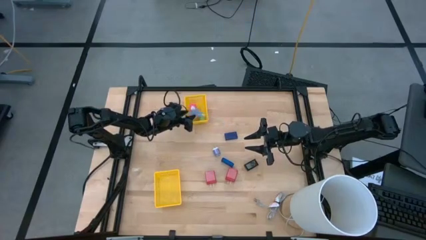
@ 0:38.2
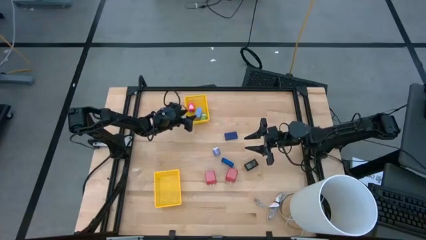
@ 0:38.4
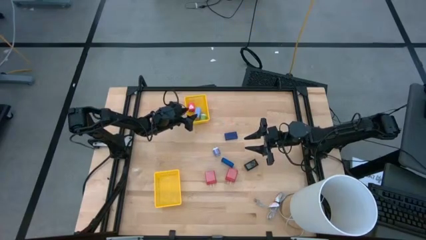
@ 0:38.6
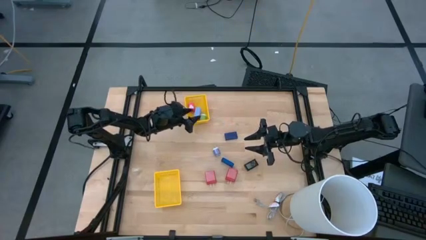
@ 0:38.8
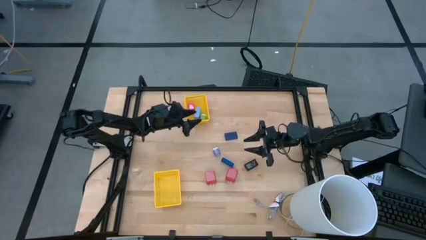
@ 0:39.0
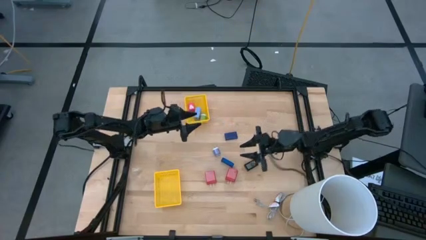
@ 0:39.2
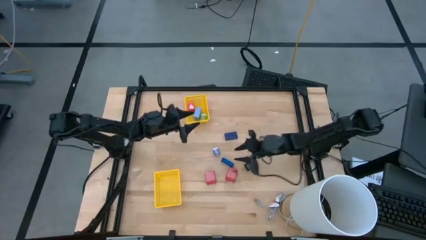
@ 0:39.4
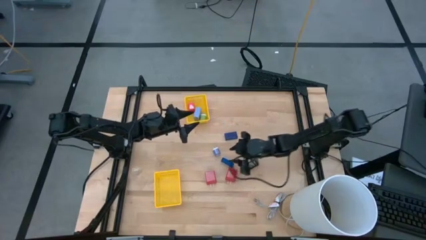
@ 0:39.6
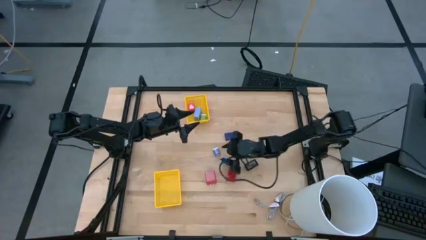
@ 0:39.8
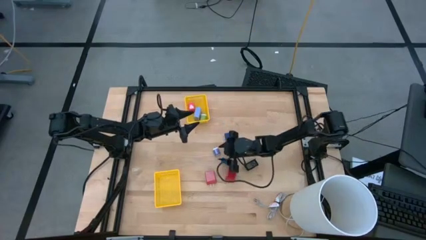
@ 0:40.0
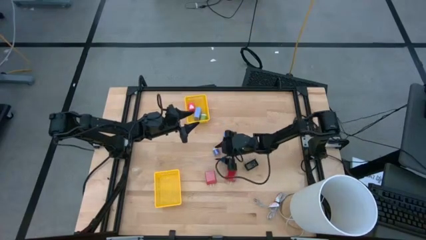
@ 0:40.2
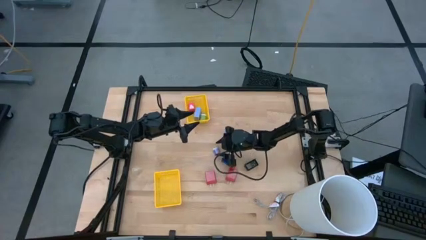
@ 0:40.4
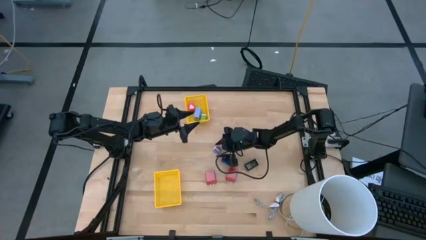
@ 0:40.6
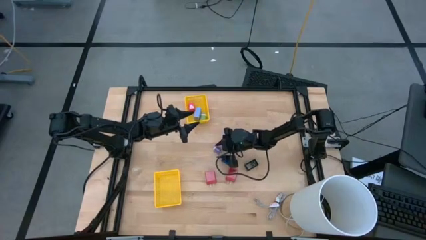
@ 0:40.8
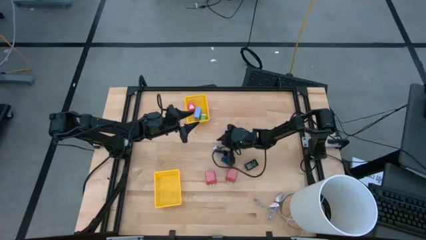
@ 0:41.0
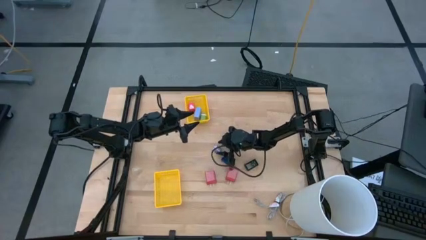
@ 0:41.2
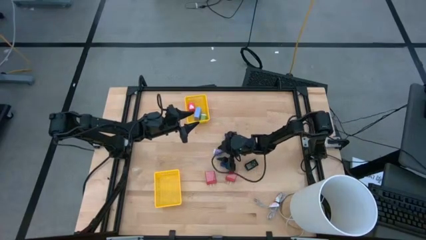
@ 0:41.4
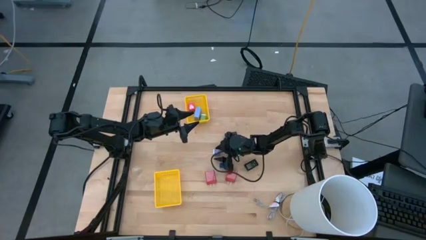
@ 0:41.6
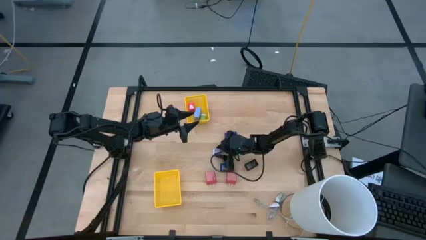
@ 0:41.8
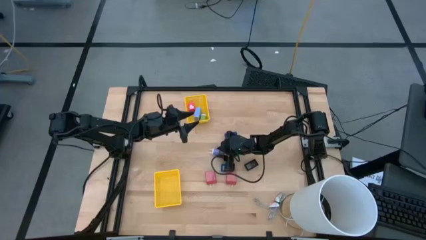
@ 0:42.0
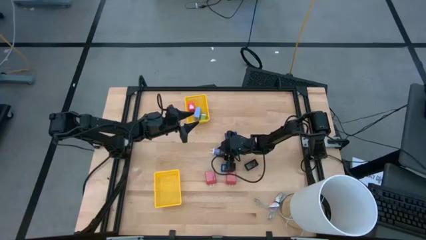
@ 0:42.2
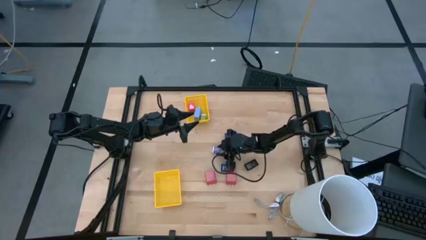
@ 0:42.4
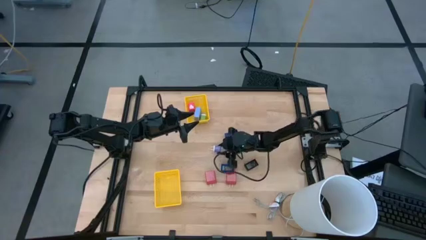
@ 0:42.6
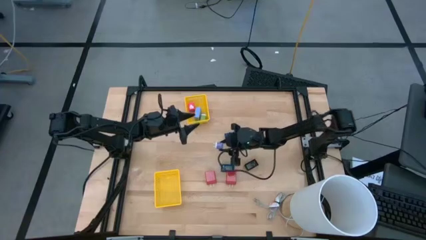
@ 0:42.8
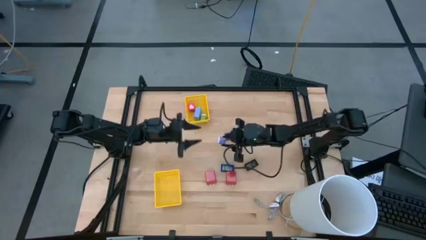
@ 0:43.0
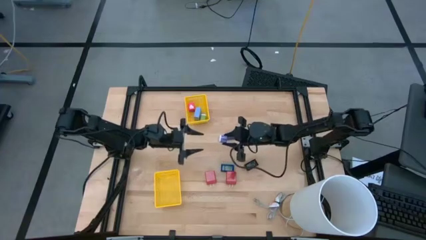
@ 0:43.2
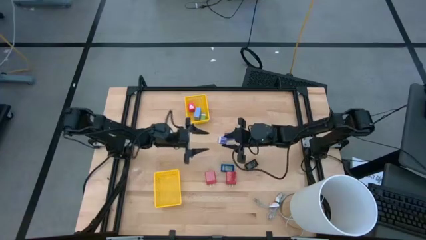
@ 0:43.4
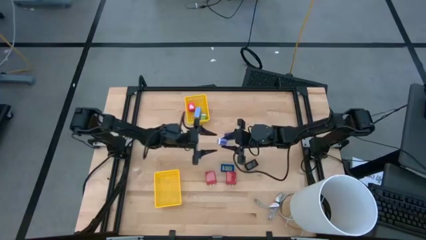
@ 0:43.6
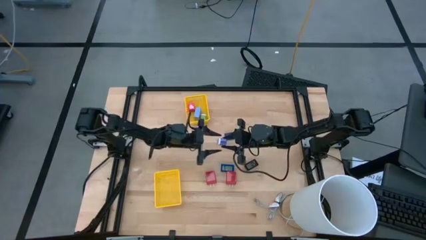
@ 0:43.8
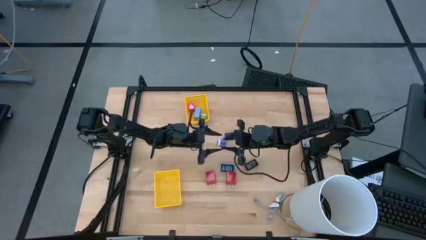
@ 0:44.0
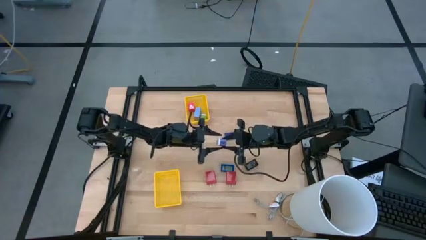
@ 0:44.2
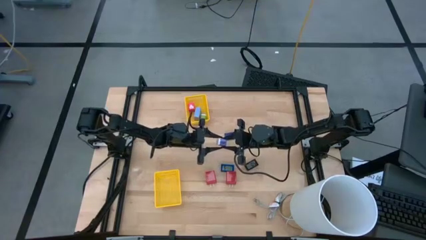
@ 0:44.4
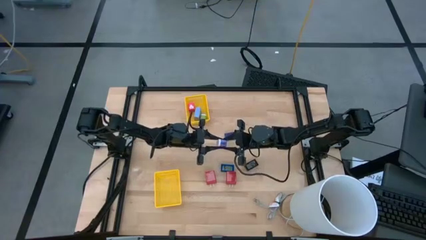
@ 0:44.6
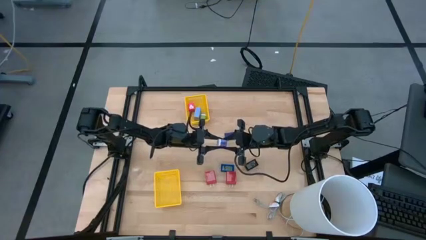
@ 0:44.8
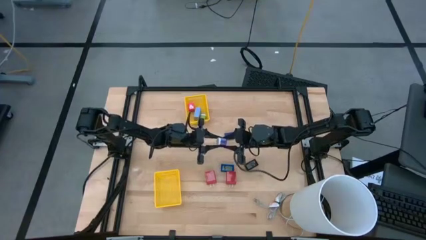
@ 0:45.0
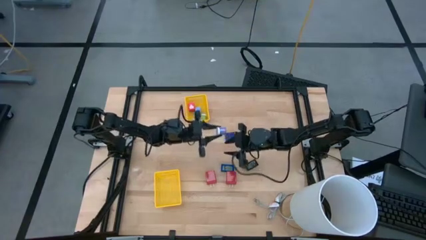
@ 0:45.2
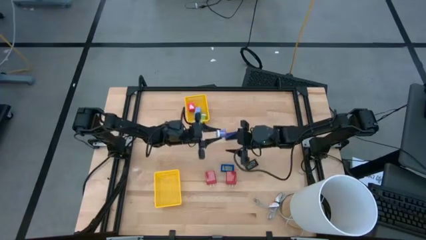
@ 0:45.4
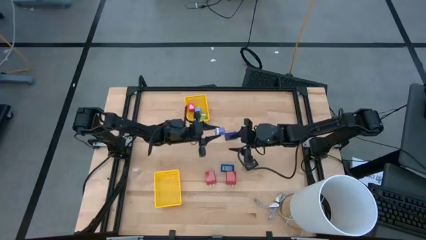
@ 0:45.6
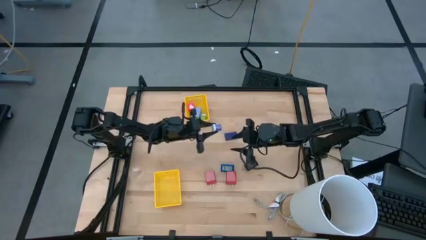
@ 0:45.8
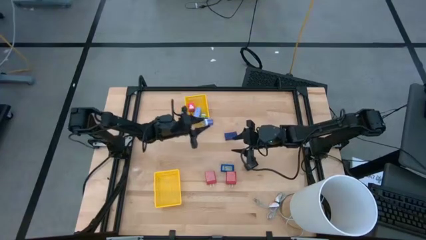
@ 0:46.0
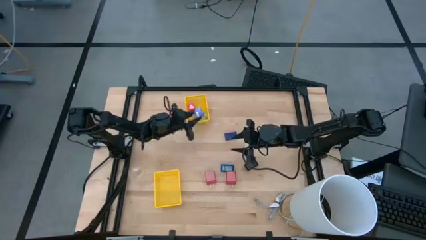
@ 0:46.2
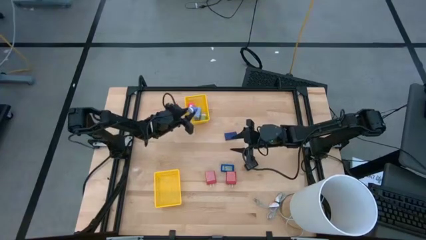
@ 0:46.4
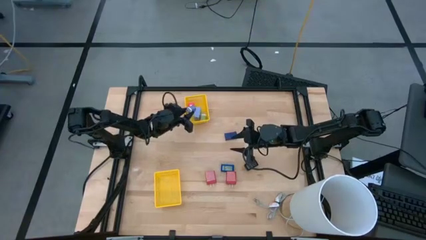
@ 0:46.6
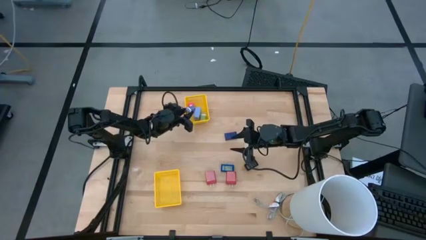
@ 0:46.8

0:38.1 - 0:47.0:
Task: Pick & Place Office items
Put the blue charger adapter into the top yellow bin

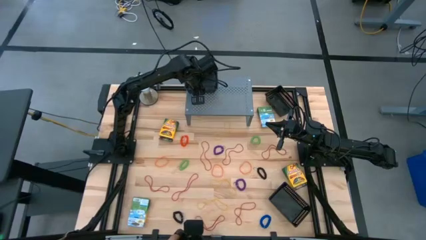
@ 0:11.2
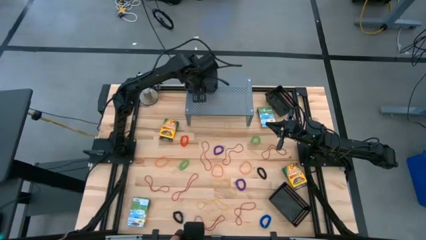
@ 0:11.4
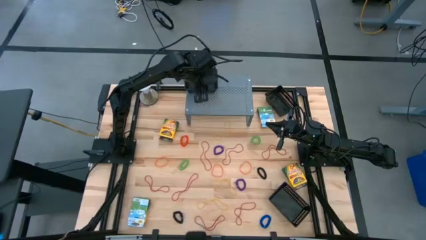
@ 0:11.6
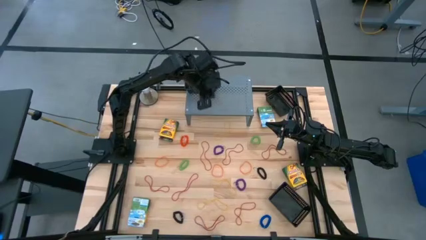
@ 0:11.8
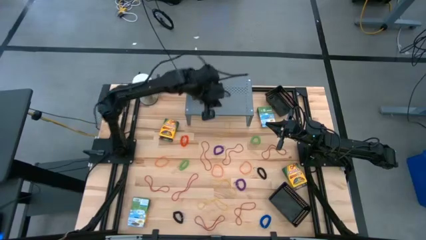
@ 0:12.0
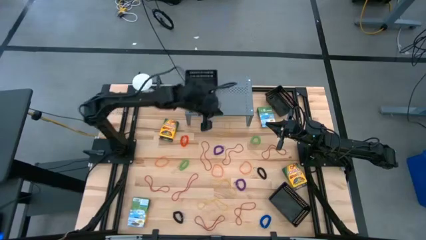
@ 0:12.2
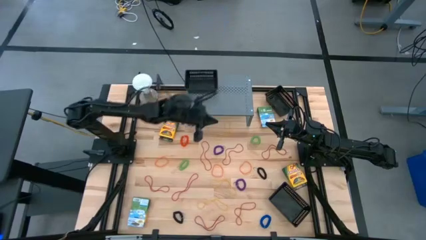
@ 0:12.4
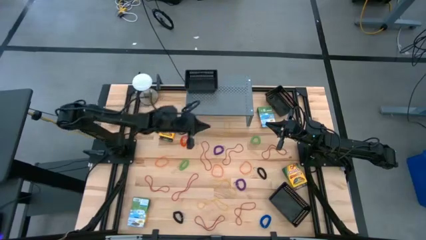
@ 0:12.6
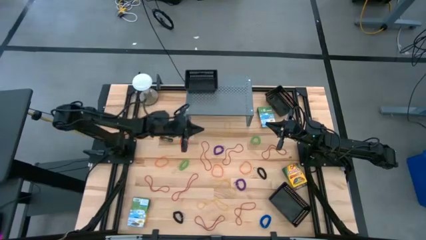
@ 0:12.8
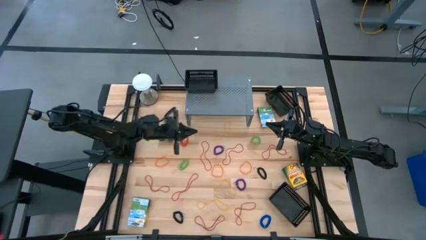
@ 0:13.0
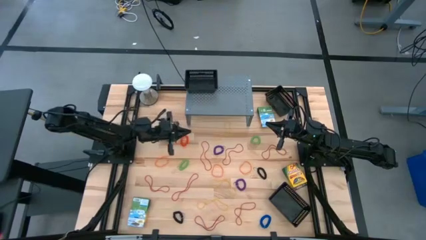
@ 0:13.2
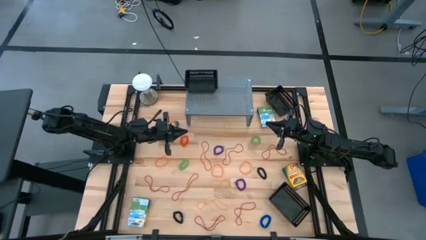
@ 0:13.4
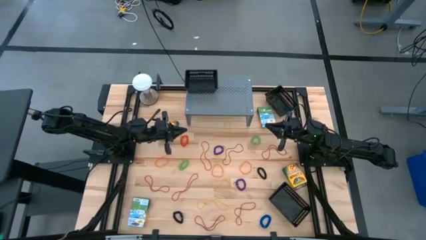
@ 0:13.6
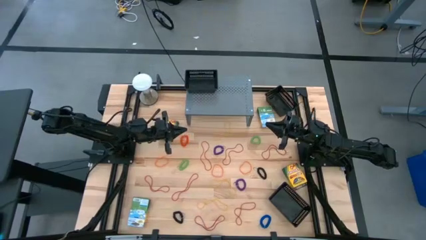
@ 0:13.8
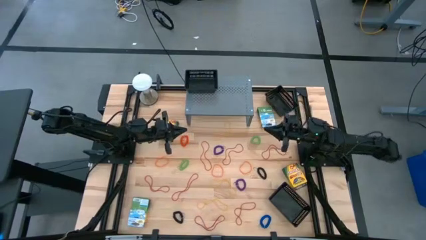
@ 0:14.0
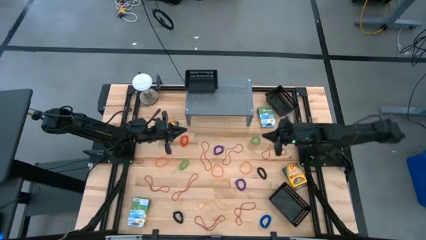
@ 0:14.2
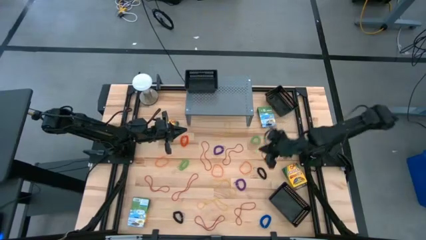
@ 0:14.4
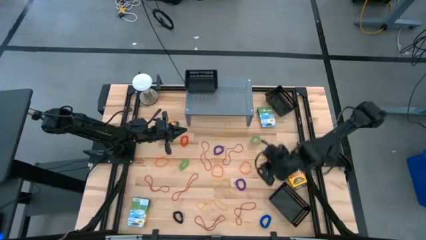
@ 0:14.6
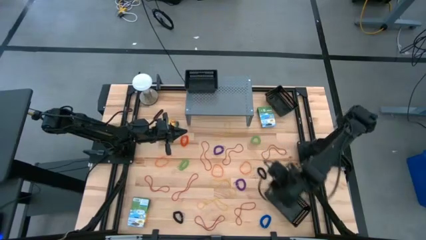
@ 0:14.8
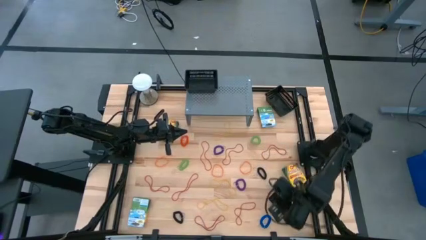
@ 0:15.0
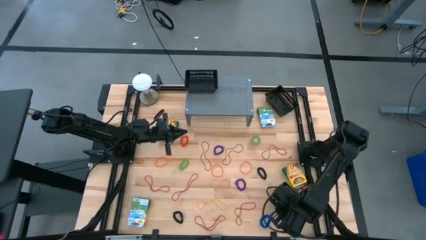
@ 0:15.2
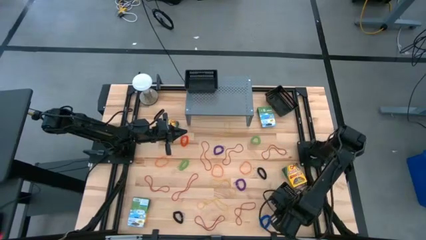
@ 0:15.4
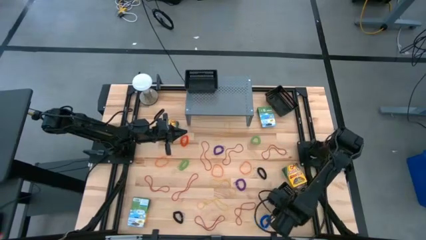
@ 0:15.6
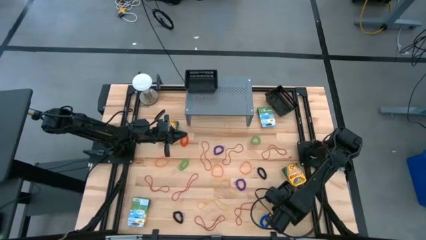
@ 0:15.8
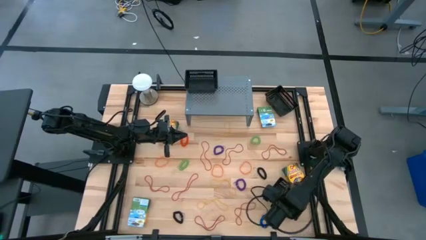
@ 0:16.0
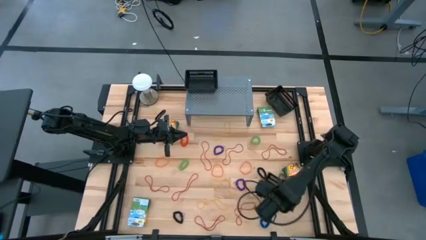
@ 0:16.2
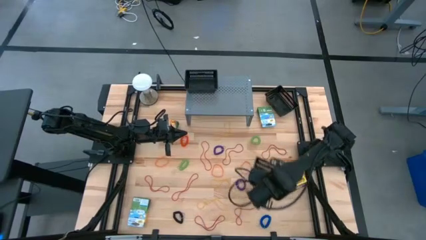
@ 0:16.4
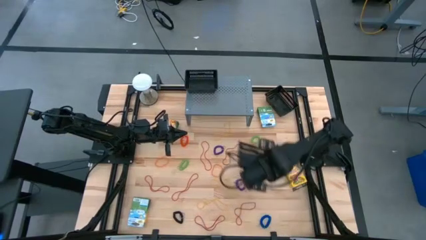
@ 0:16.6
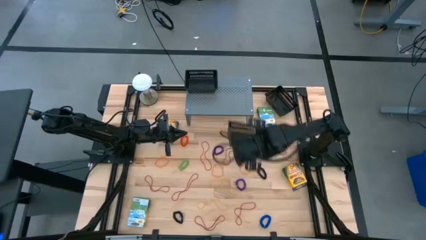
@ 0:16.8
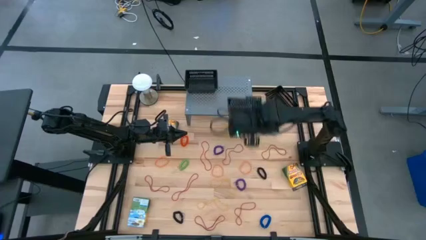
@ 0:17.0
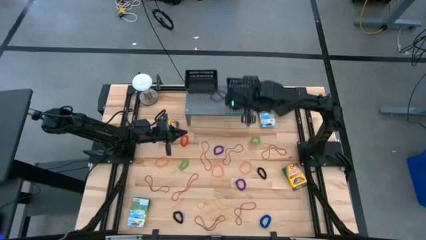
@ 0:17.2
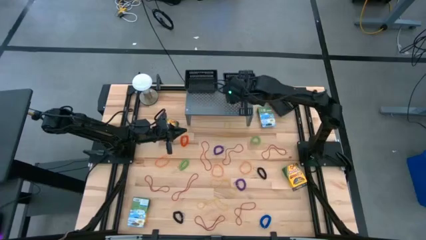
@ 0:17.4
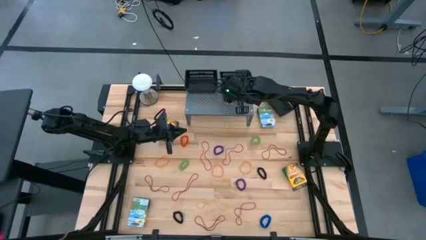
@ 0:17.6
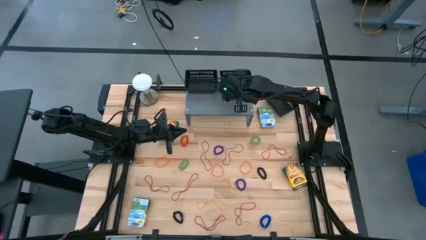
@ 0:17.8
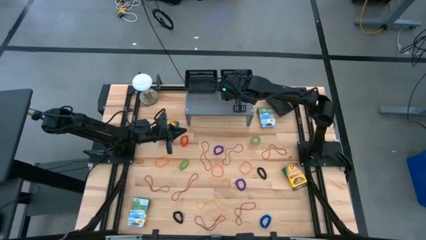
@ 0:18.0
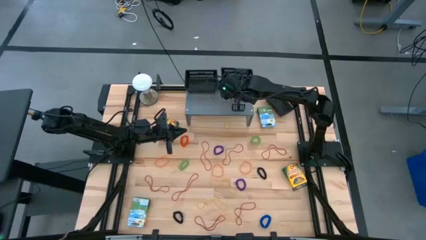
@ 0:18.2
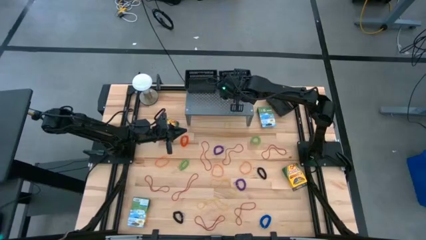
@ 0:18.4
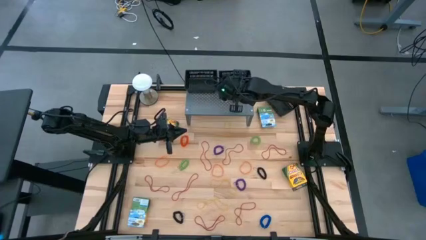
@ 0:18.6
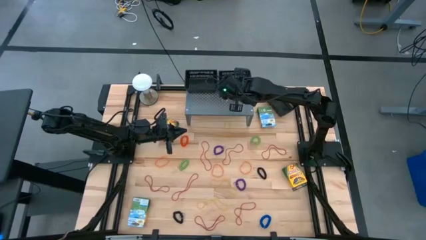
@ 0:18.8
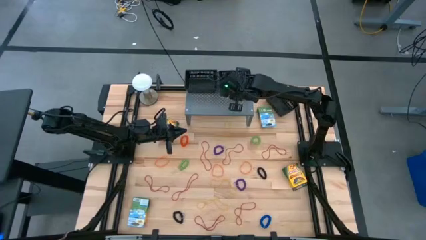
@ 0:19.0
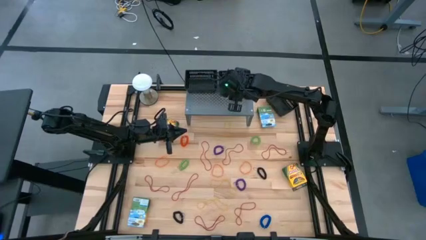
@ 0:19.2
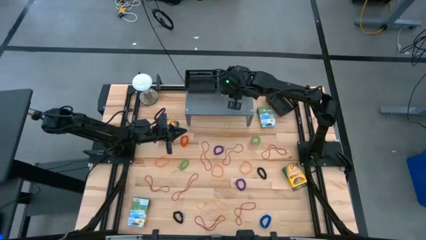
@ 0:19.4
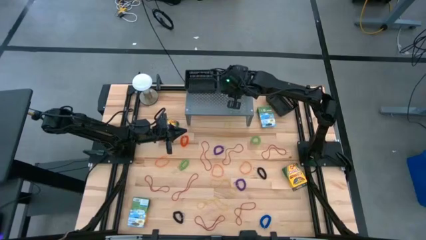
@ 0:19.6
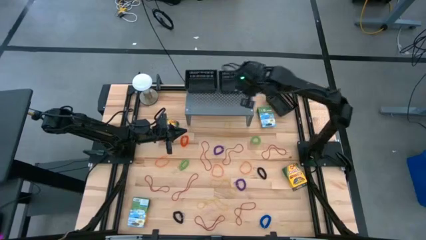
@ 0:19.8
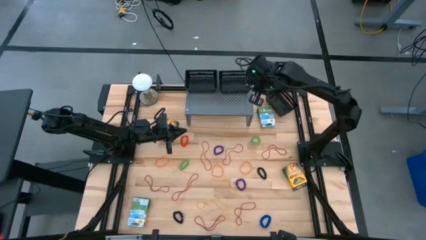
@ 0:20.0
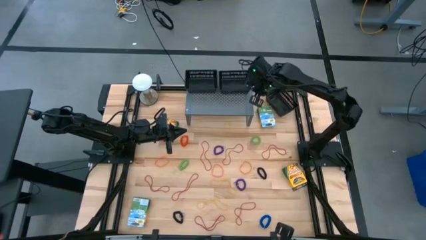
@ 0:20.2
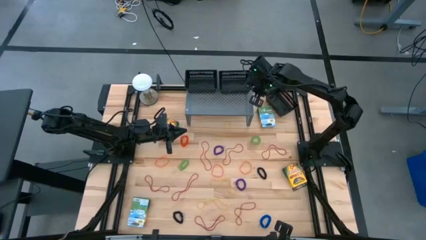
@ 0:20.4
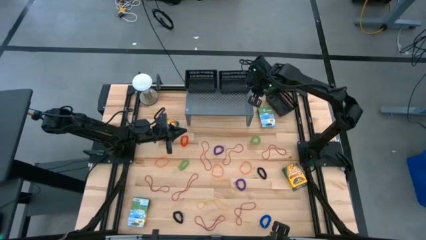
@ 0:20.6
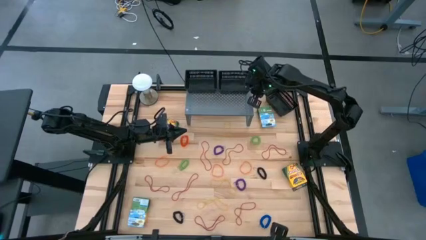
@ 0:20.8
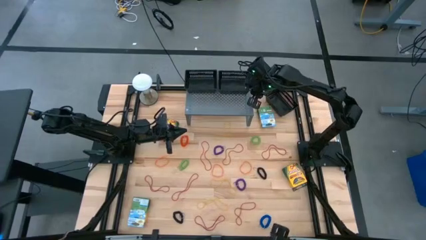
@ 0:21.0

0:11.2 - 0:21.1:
Task: Pick & Place Office Desk Supplies
Put the black basket on the shelf
